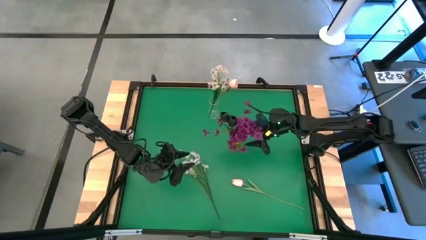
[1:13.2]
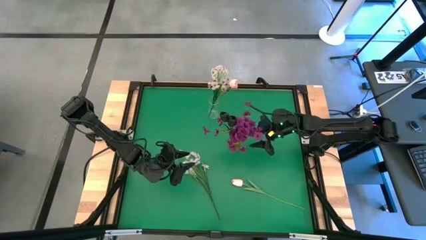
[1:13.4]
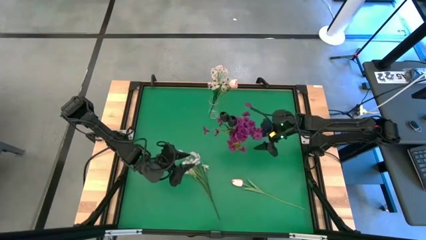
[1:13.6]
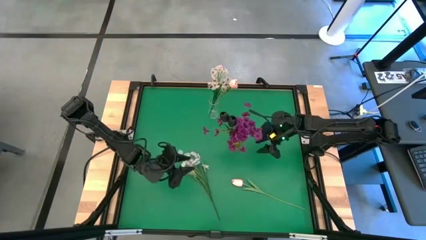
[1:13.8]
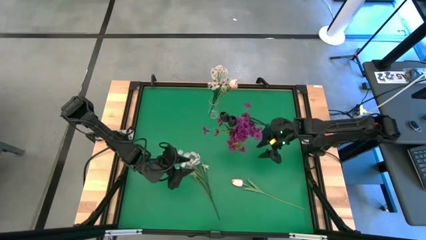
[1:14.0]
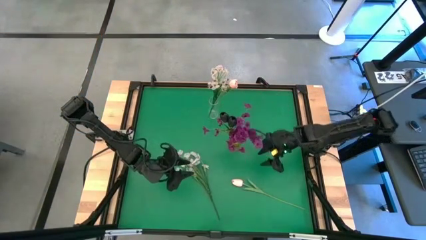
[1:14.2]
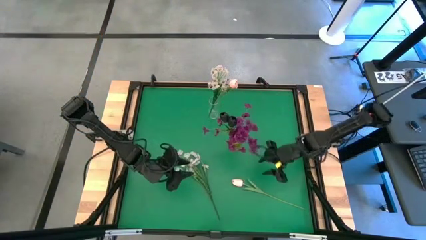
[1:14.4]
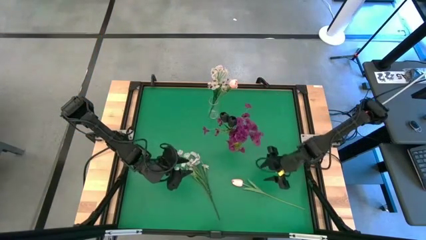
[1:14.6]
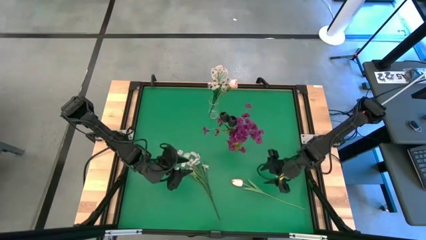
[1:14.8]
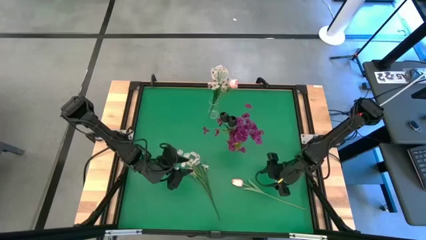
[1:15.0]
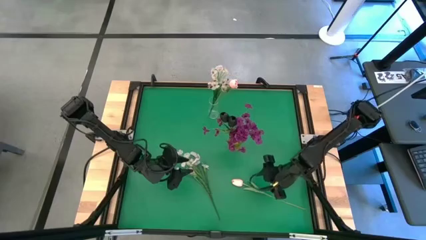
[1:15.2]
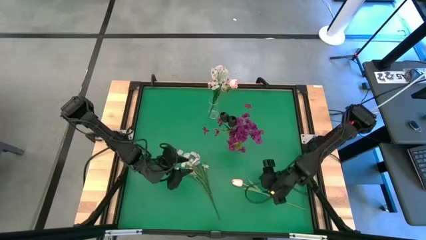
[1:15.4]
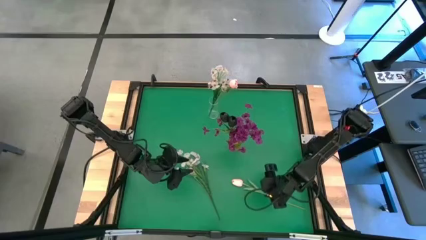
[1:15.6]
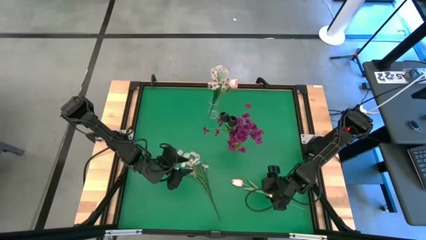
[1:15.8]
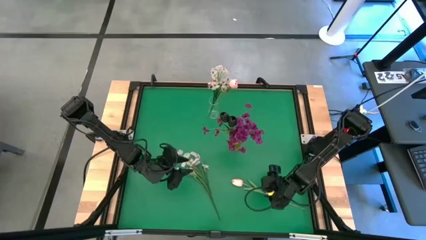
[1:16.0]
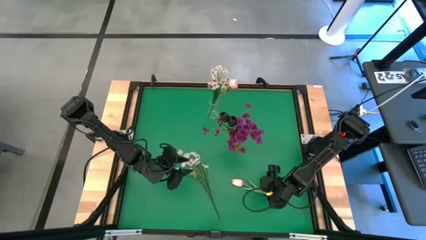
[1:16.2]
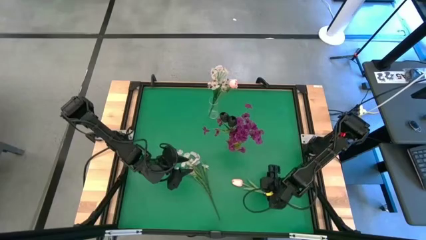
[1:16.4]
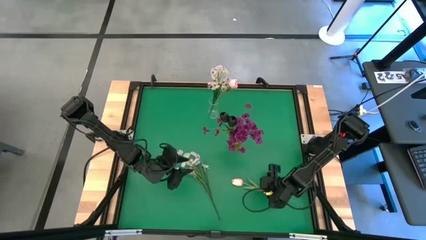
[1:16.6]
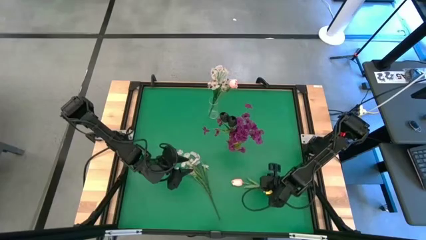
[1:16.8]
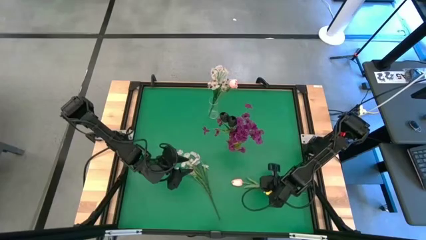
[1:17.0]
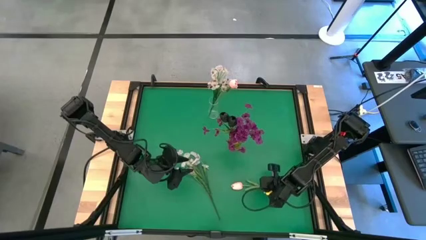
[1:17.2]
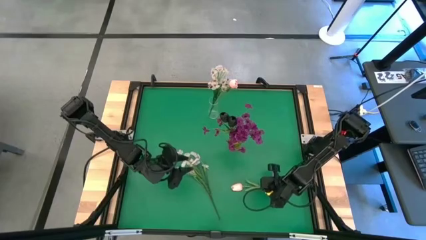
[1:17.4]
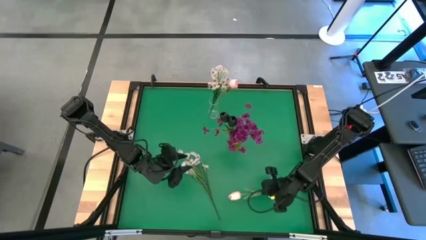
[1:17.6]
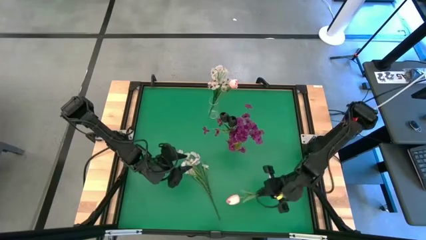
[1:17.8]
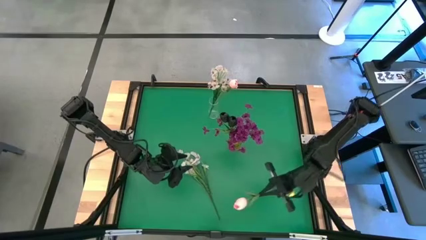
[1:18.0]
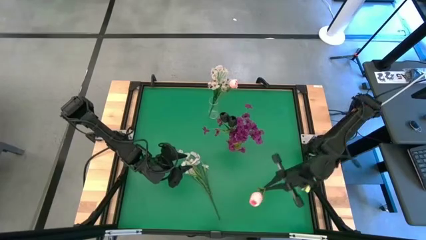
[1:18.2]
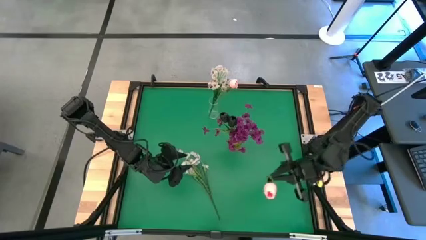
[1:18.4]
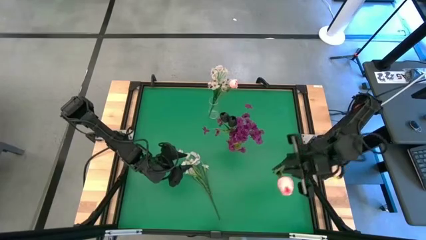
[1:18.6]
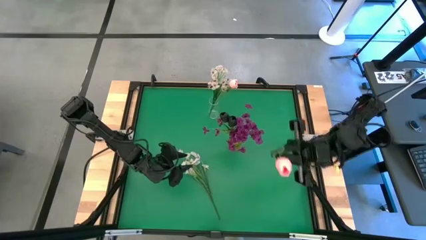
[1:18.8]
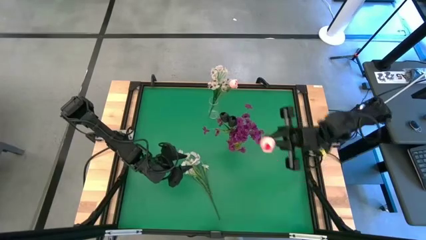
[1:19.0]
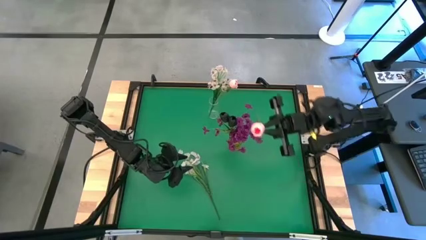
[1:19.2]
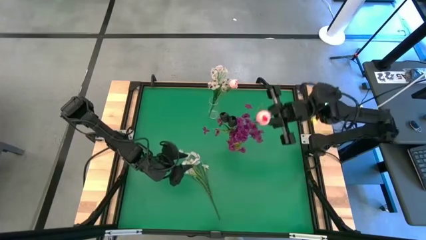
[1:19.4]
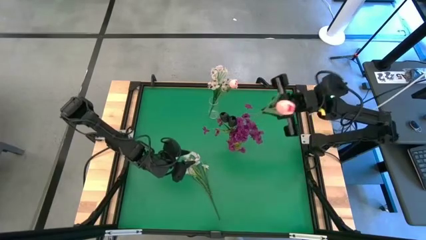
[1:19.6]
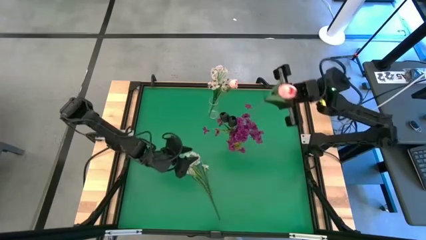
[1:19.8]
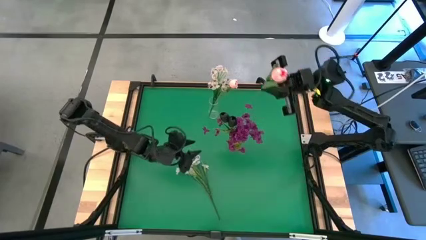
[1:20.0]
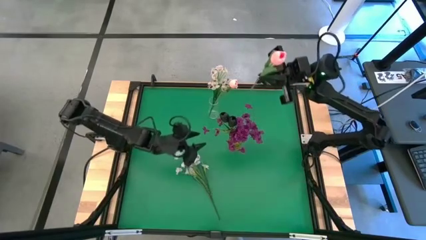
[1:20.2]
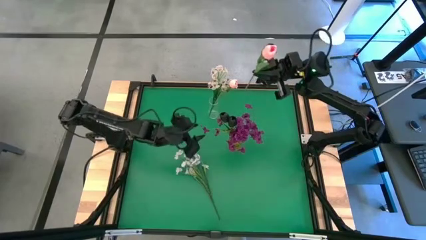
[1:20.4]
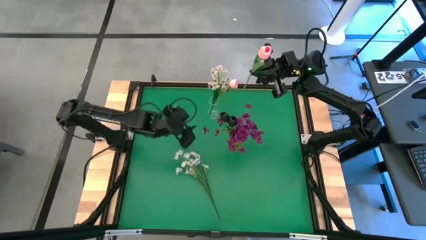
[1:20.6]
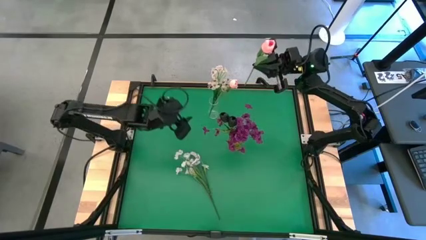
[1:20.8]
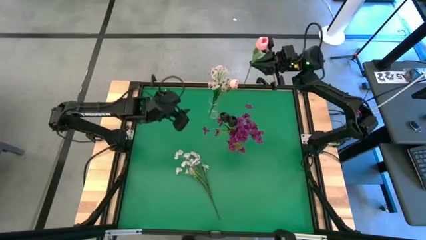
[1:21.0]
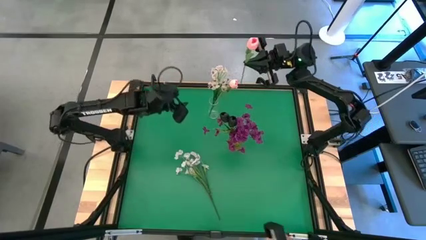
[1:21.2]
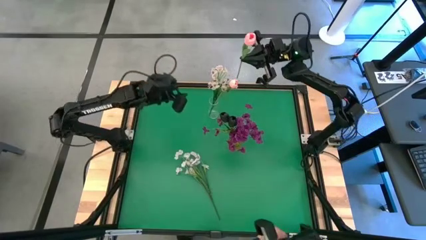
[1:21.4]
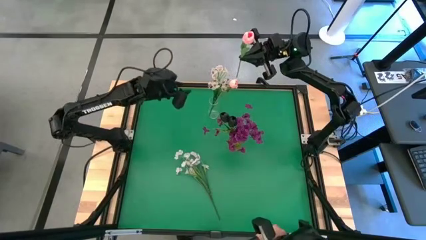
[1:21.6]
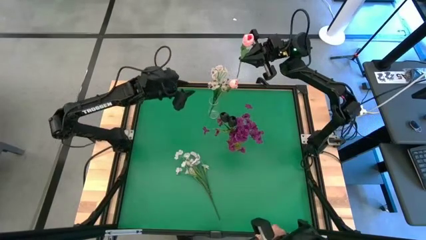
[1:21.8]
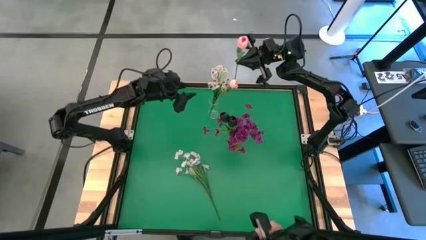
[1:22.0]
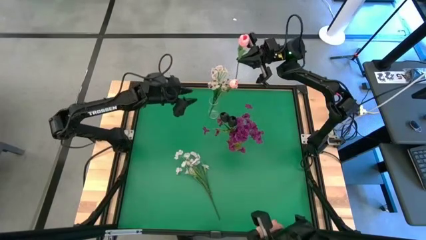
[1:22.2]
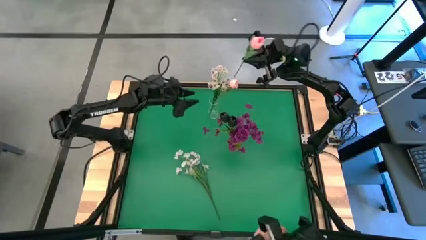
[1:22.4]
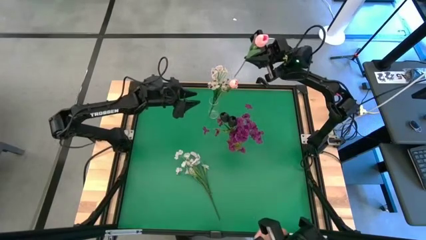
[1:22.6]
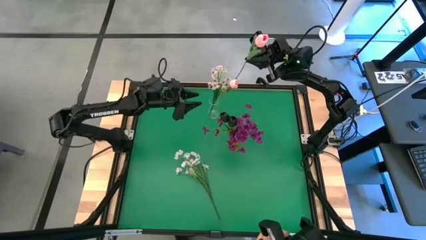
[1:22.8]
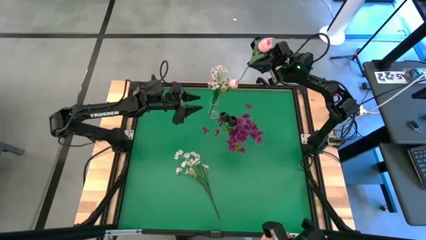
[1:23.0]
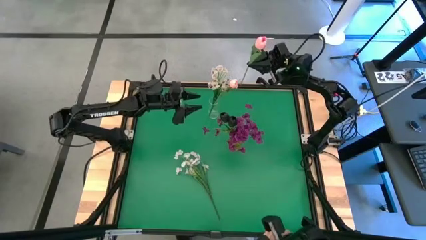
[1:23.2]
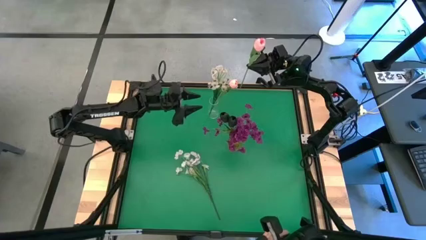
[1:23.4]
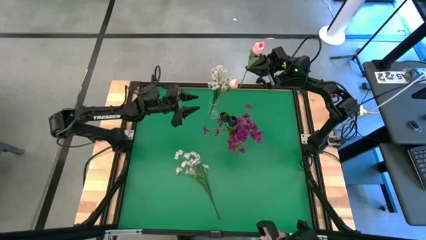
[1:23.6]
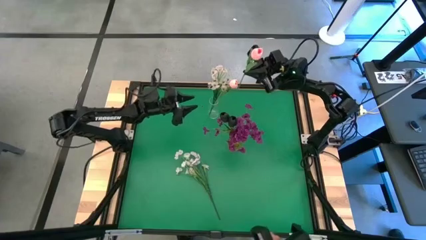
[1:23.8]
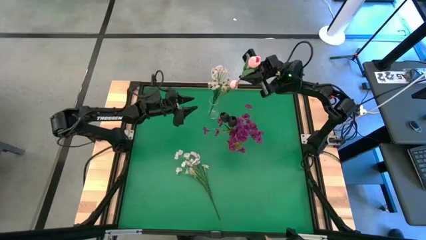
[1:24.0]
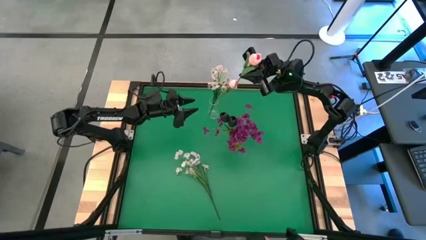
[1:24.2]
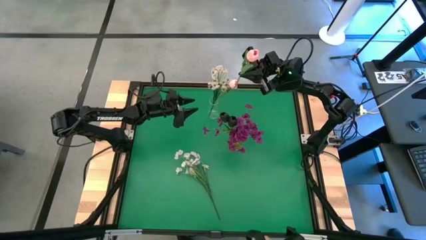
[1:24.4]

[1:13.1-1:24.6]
Task: Sort flowers into vase by color
Put the pink flower into the transparent vase

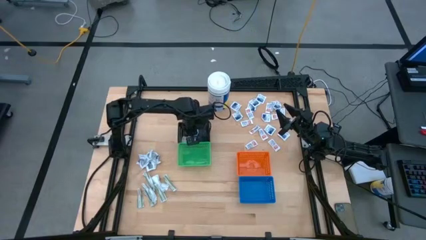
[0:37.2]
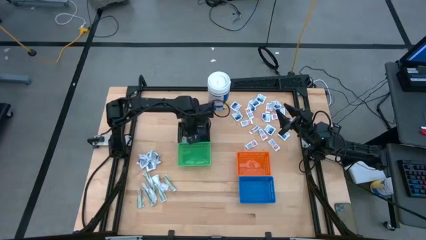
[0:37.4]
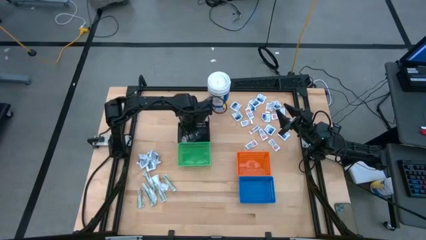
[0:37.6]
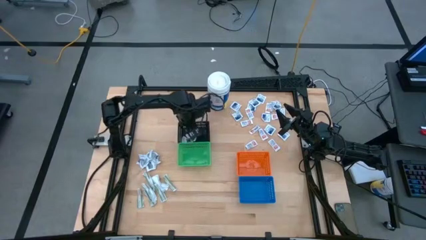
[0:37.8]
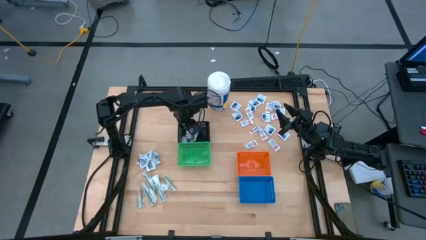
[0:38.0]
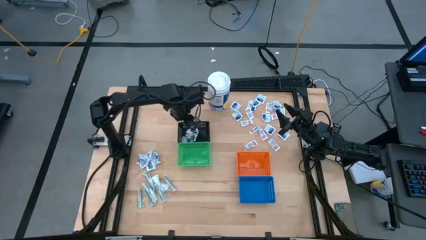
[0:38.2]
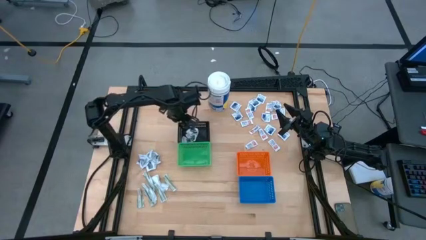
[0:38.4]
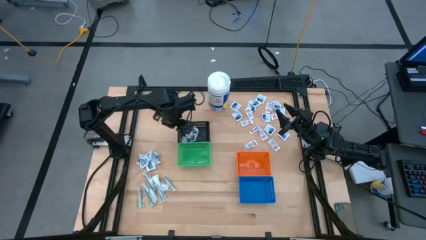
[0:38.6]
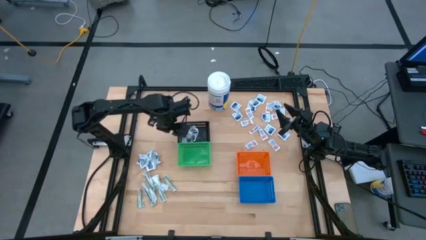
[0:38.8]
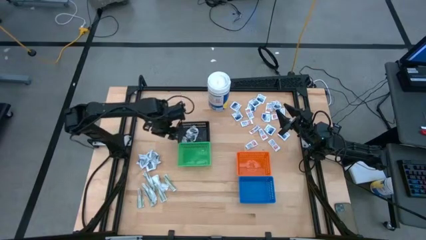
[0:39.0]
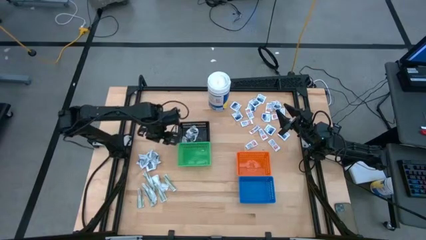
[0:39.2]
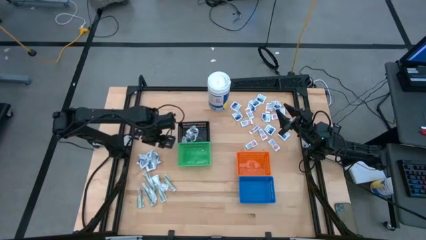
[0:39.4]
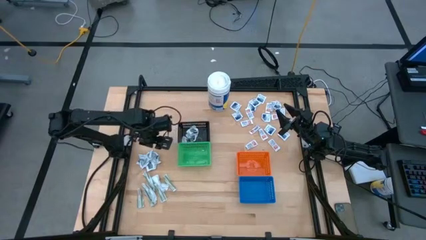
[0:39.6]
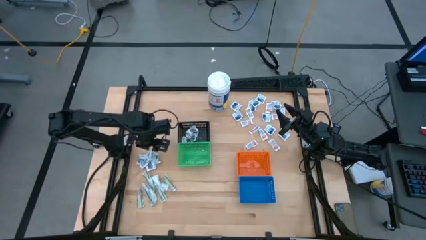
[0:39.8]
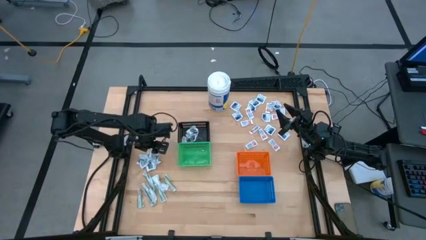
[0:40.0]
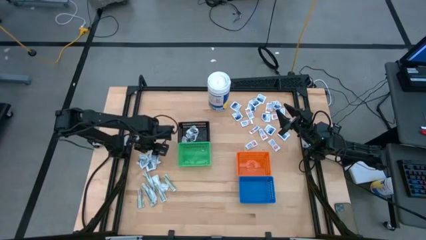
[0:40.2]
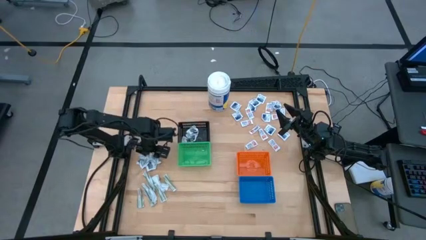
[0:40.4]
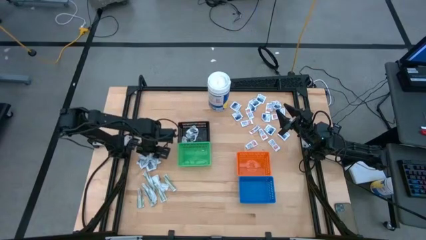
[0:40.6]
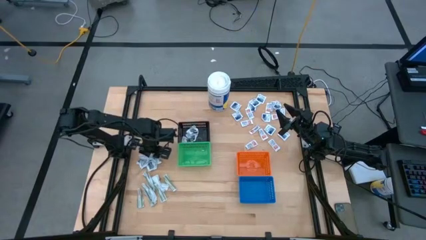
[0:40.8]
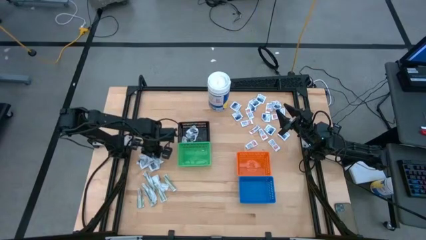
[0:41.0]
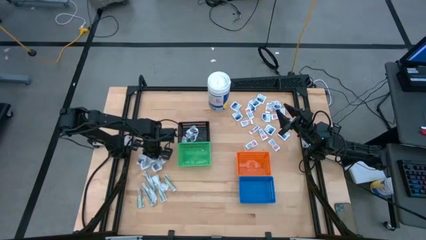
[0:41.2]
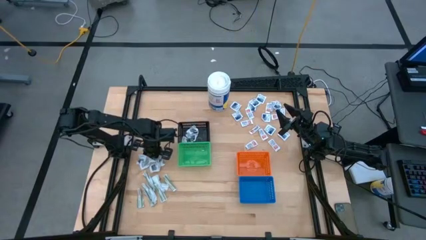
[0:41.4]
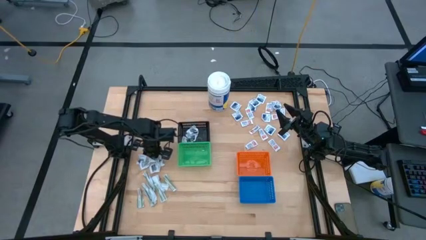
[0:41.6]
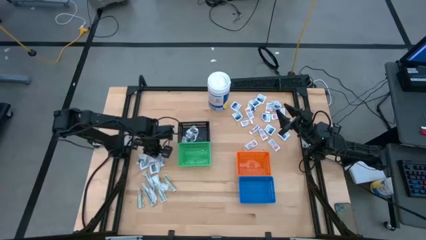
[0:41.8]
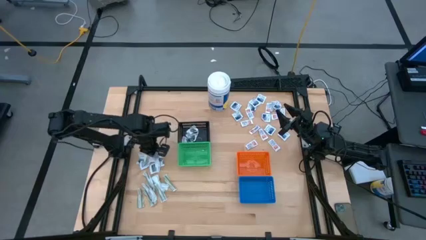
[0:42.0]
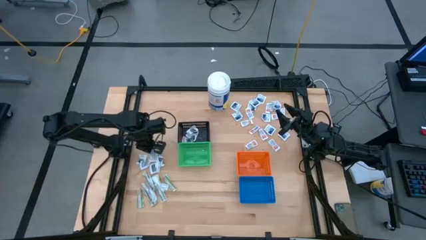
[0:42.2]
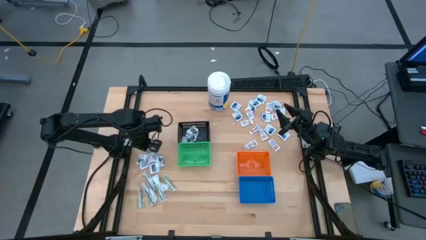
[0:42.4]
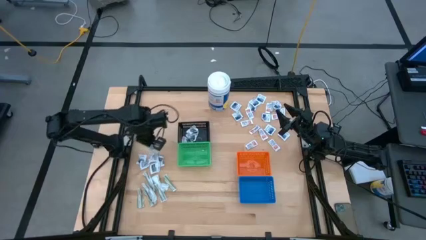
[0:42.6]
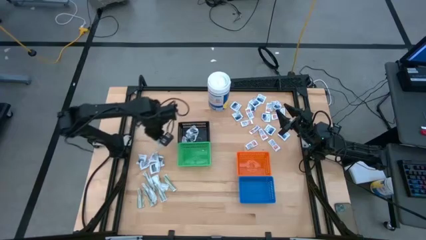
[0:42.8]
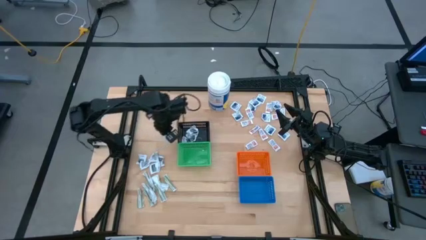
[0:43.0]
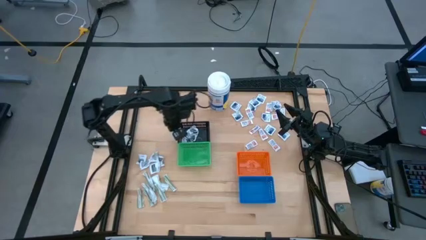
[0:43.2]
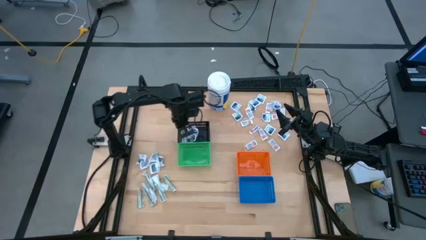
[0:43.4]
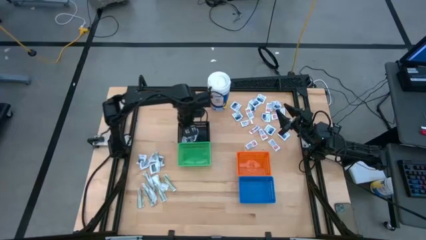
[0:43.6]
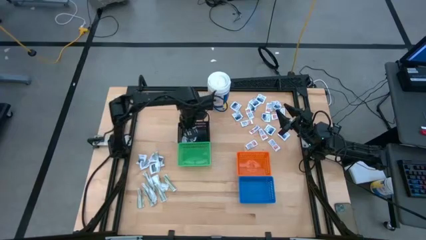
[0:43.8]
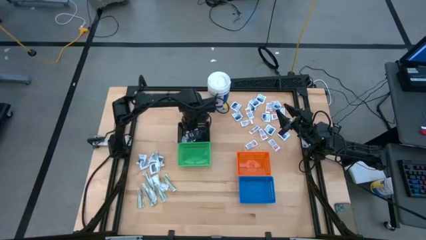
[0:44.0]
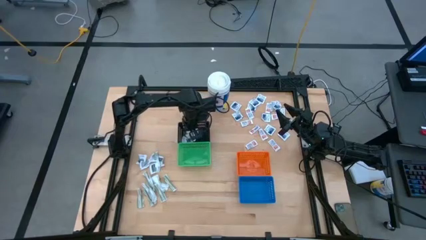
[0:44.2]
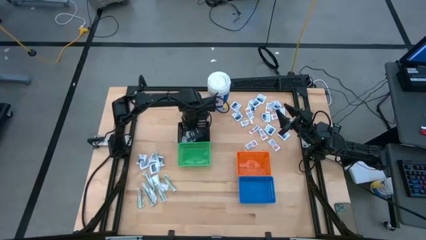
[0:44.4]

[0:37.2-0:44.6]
Task: Pick & Place First Aid Supplies
Put the black pad into the black bin
